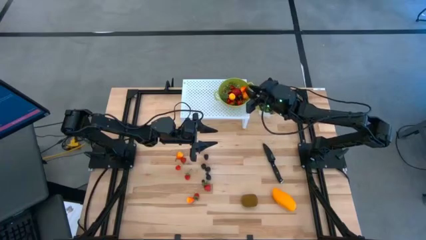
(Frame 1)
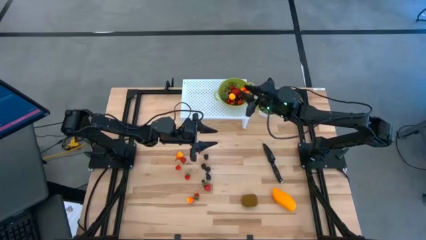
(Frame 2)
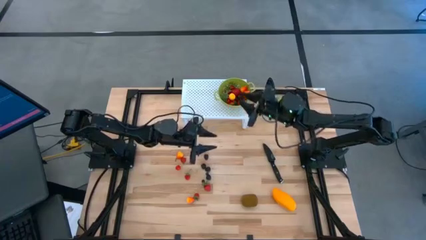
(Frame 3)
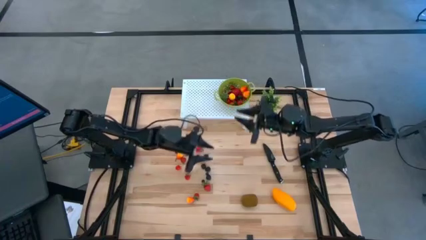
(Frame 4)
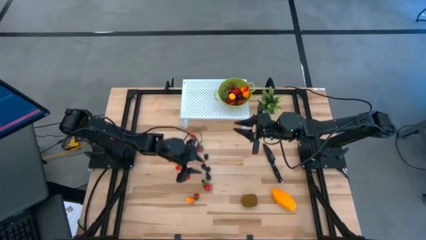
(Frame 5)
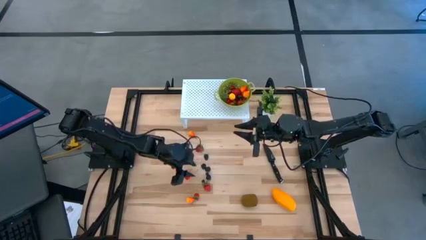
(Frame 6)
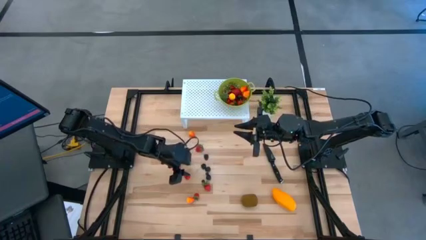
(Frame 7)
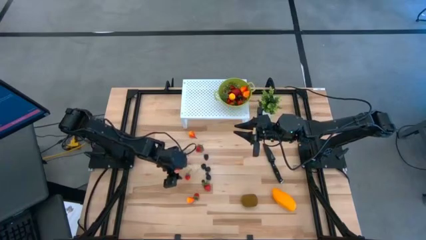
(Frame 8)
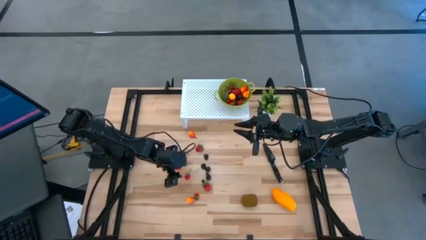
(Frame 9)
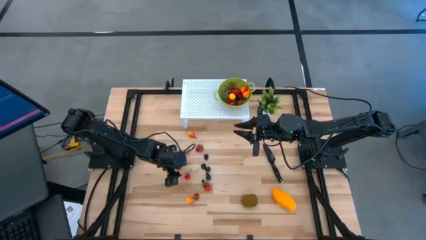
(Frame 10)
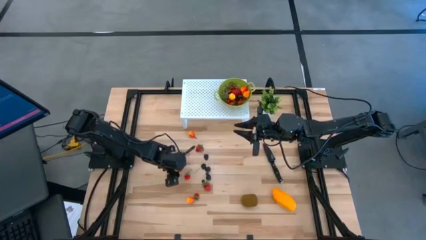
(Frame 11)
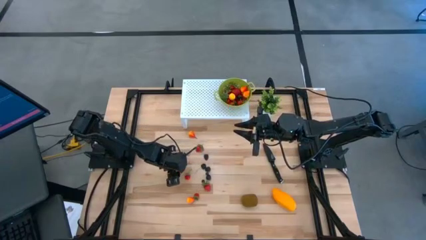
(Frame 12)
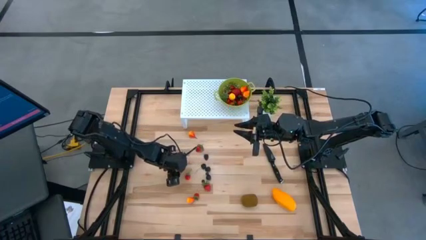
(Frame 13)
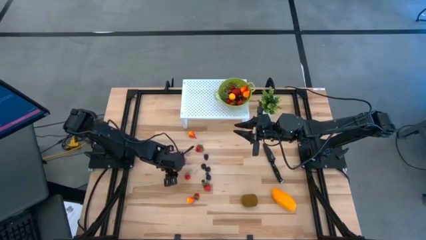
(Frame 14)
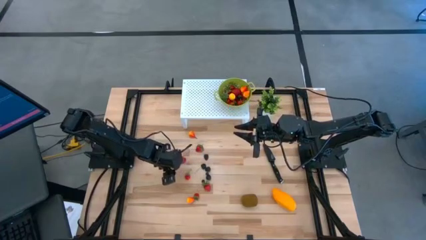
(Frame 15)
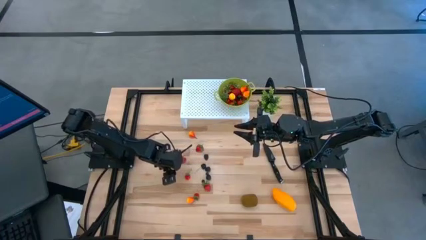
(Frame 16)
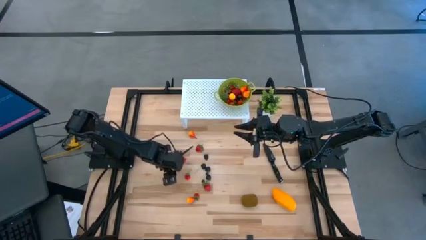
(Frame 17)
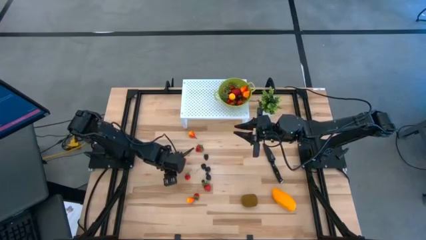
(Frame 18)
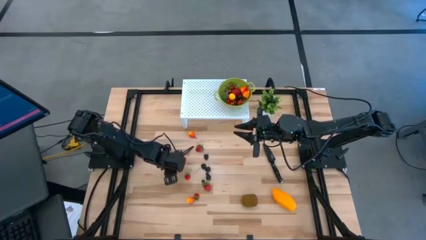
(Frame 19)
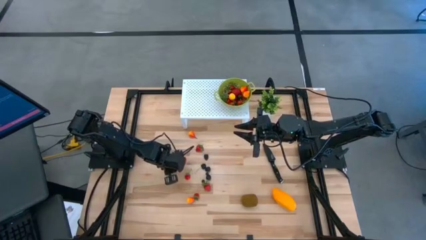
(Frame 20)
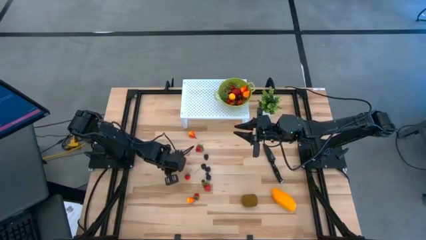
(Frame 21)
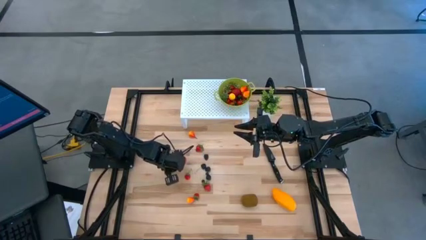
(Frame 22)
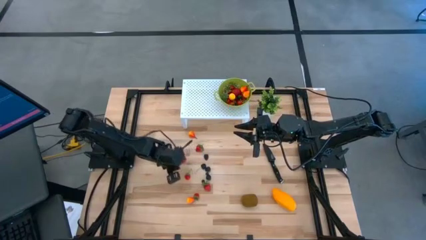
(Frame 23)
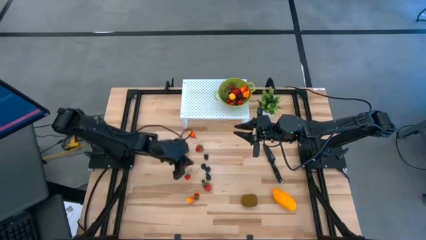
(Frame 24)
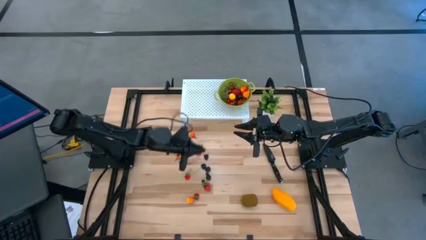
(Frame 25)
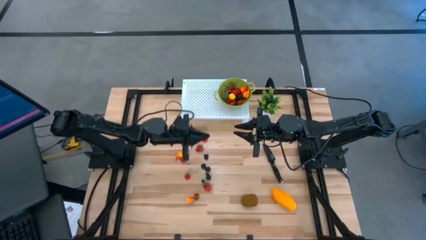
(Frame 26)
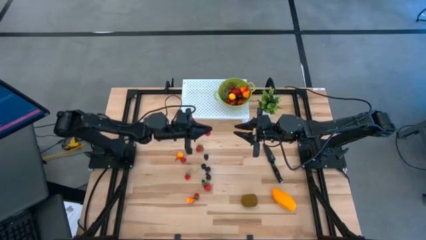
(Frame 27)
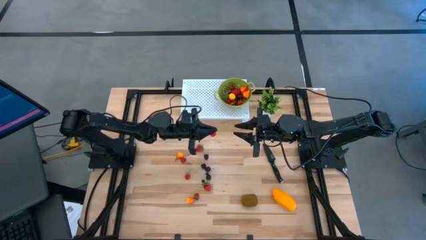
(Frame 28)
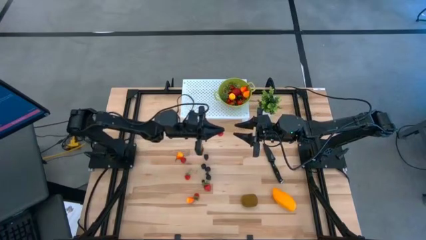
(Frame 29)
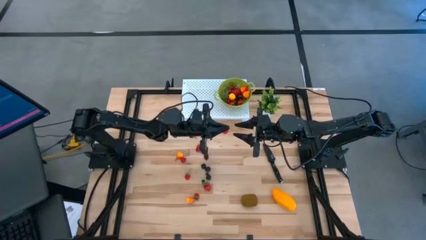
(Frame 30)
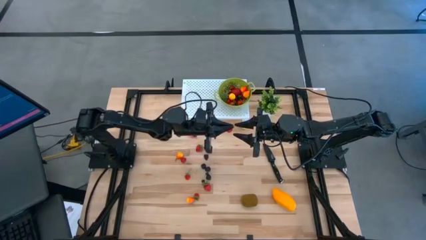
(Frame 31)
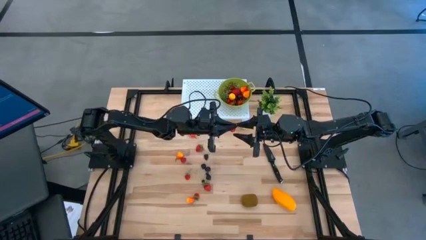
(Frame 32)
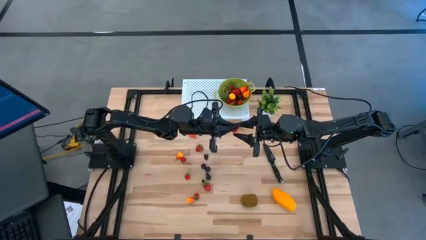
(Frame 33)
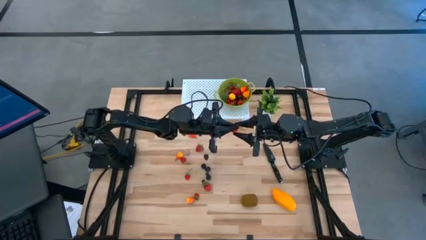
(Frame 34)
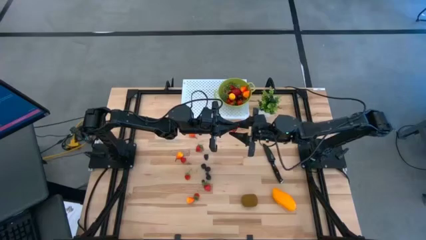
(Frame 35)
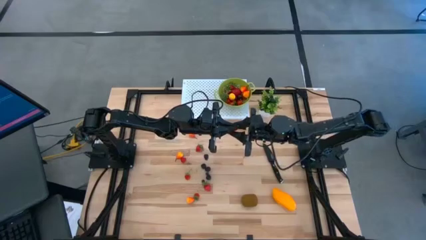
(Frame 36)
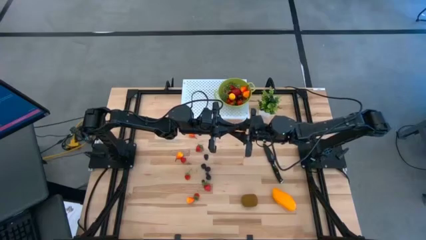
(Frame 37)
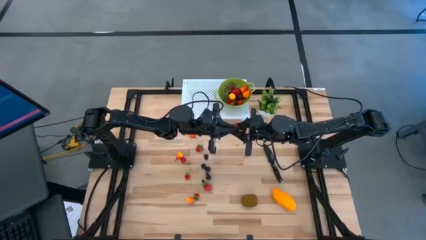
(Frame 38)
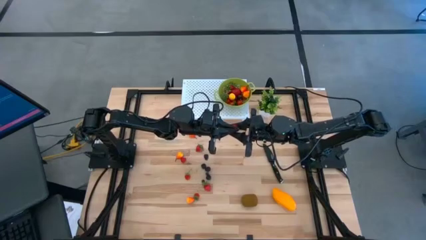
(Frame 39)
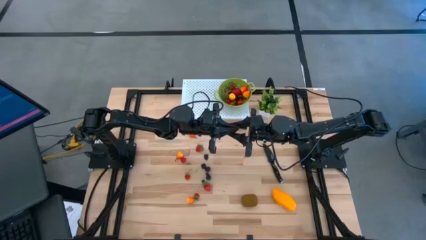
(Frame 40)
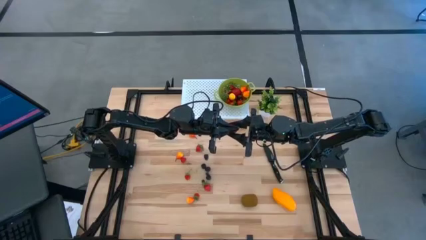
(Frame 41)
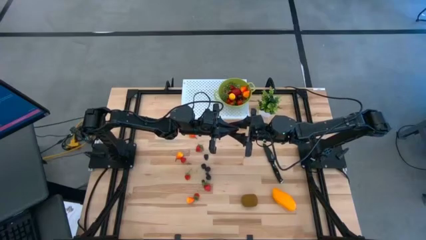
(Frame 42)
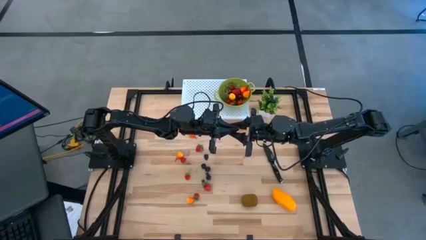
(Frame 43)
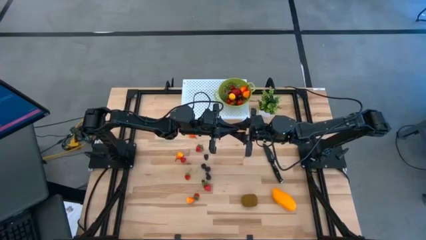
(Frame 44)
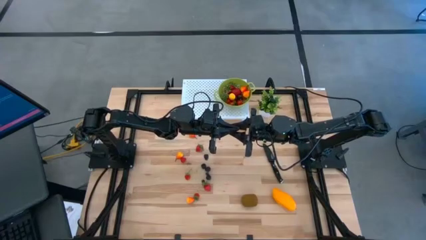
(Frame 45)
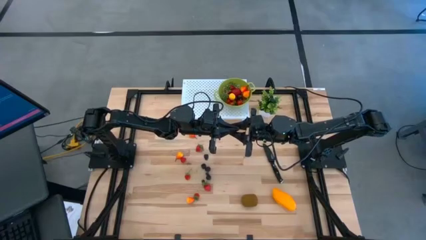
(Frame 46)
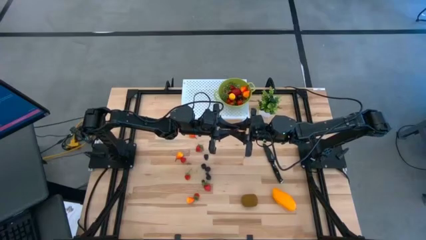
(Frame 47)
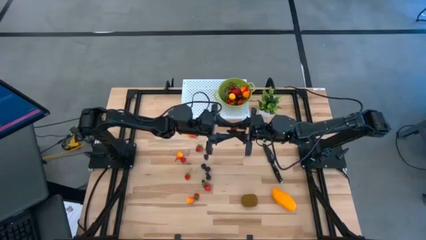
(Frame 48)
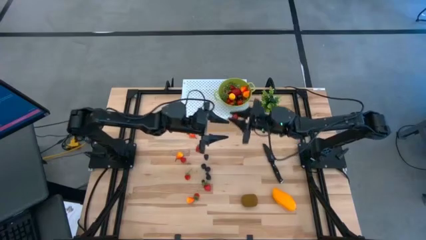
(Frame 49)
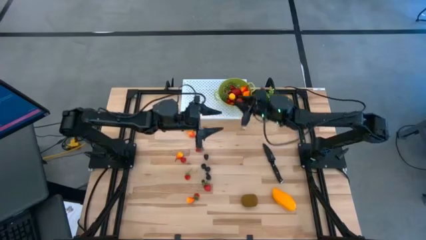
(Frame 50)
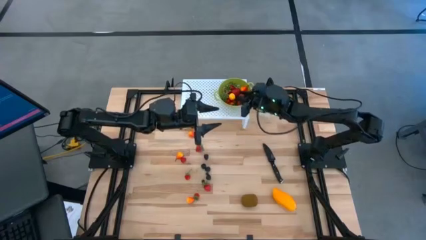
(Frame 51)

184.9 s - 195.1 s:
Task: Pick & Place Fruit
Put the red cherry into the green strainer bowl

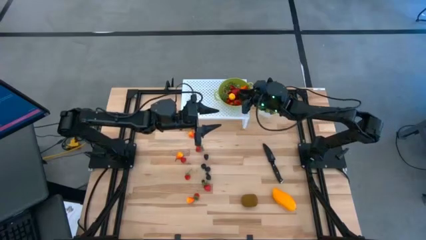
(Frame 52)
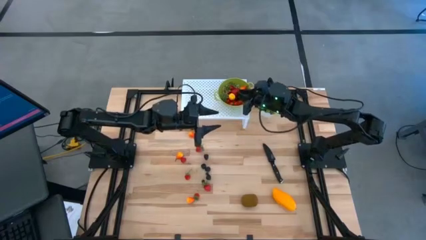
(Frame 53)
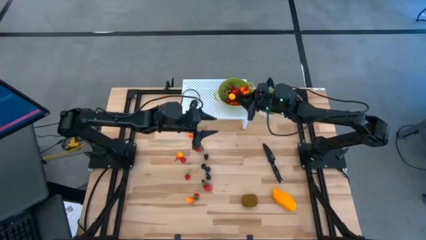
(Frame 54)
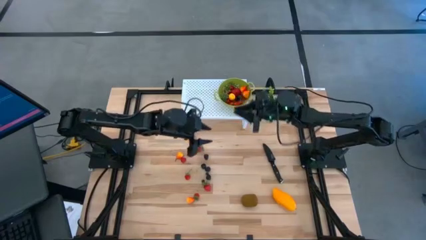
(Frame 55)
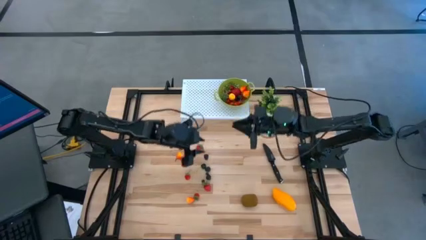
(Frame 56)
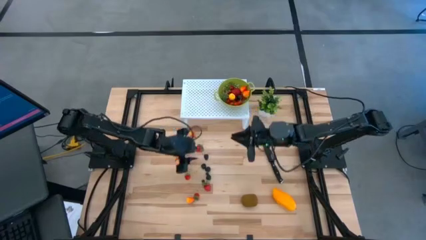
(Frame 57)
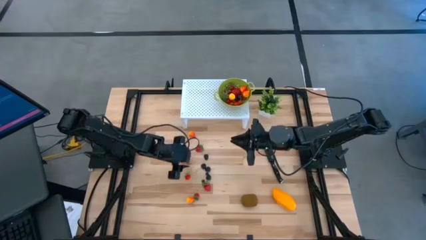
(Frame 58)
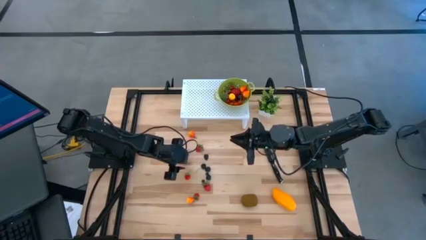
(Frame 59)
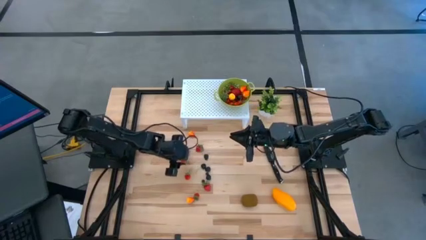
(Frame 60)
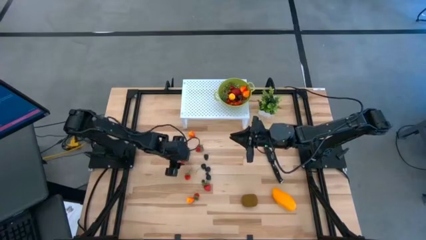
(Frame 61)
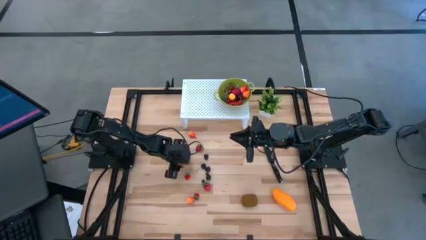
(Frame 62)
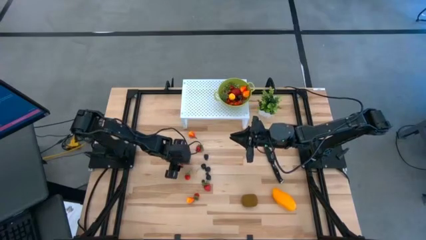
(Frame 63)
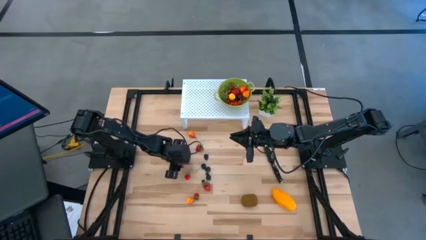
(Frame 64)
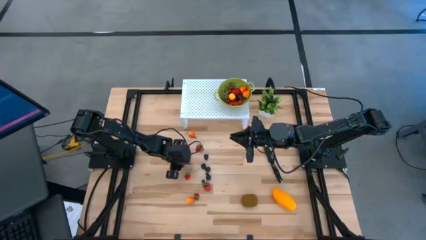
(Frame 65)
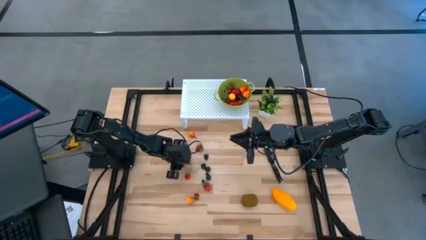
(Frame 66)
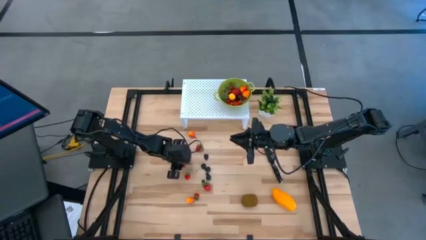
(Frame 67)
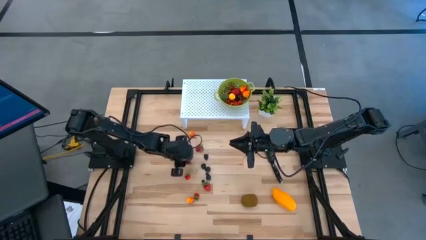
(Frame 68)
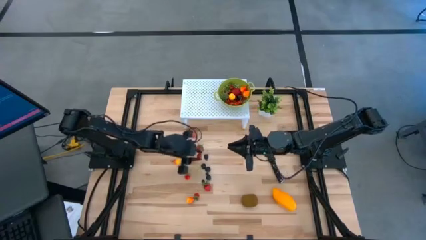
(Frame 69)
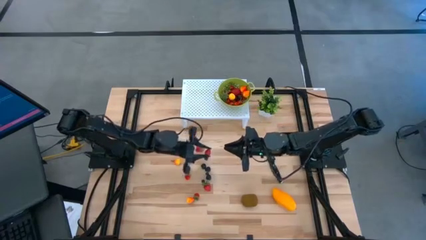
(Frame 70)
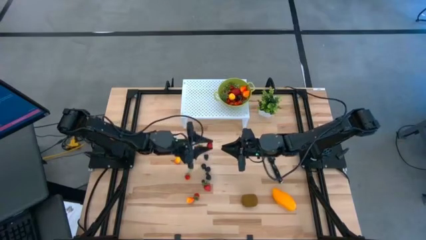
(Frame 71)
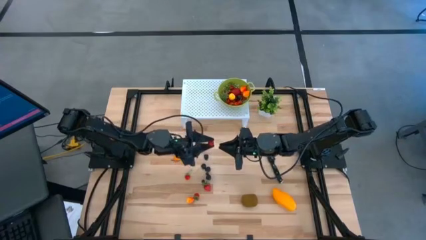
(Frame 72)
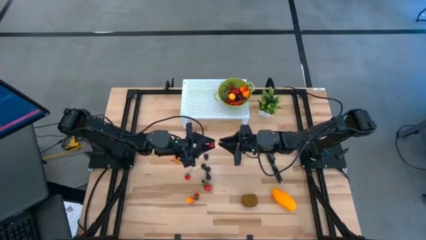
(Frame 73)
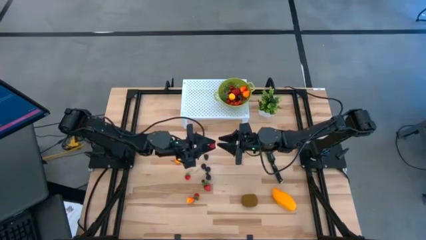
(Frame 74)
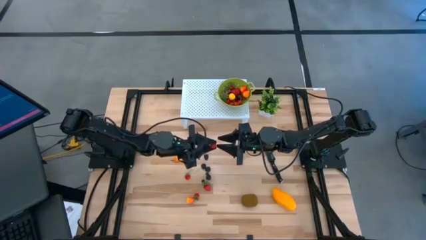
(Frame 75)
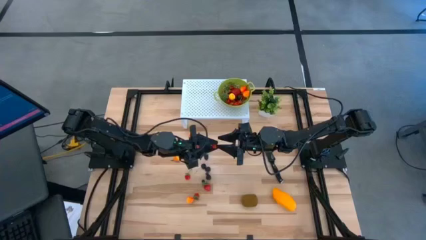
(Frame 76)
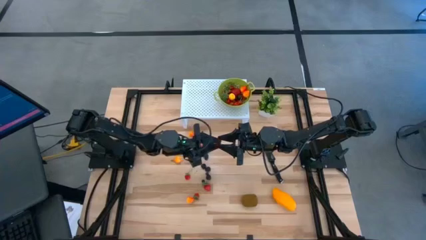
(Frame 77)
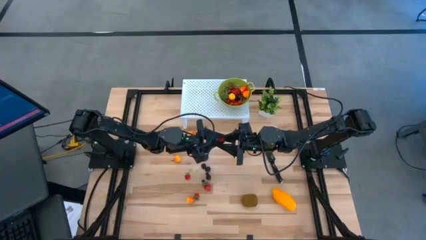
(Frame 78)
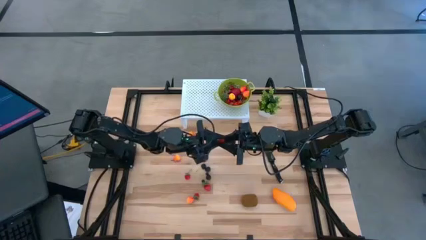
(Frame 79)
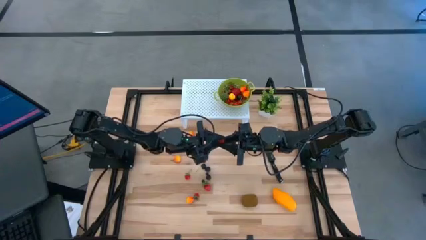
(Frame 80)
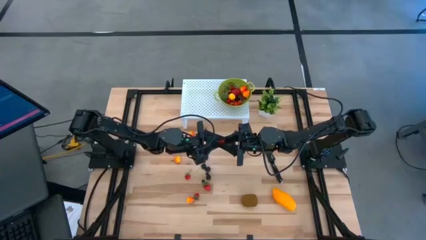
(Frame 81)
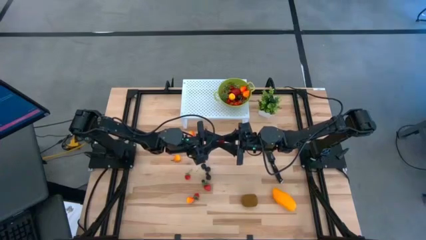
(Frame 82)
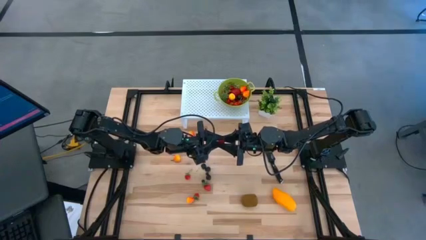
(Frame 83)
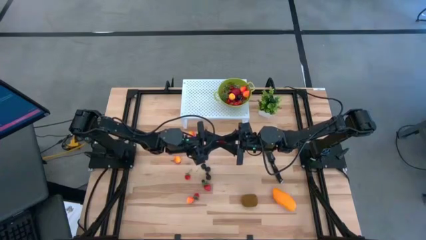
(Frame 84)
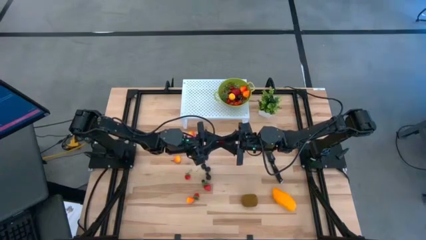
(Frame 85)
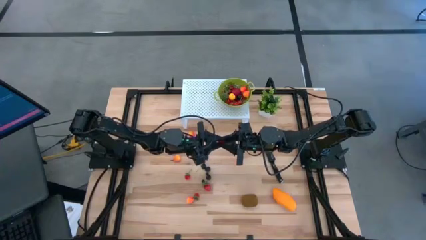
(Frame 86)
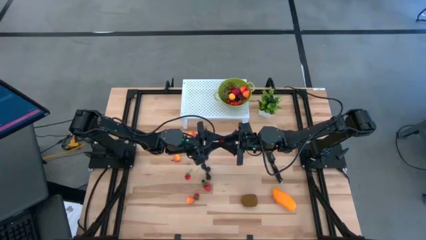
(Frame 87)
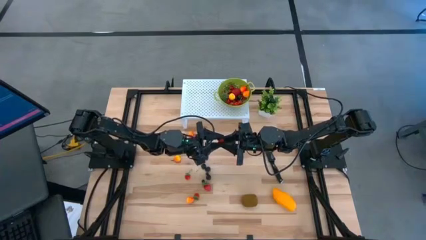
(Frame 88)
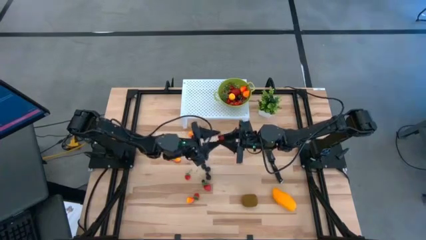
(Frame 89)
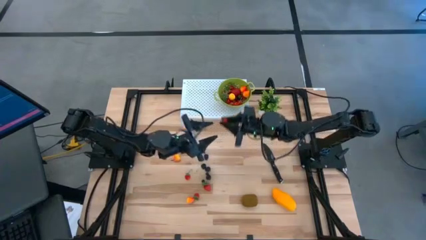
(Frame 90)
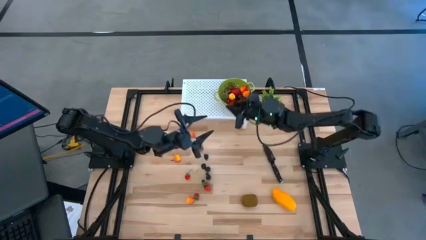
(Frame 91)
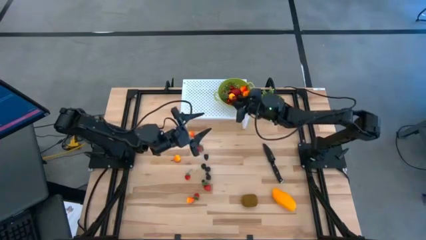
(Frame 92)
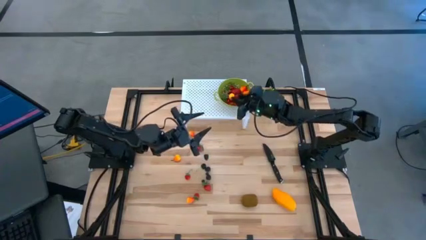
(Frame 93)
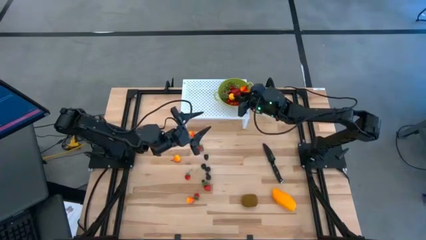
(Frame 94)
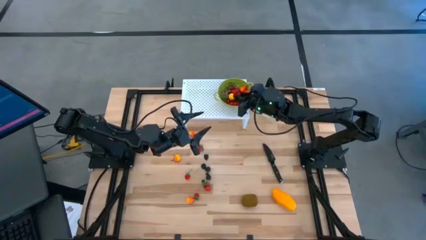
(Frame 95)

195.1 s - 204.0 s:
Put the red raspberry into the green strainer bowl
